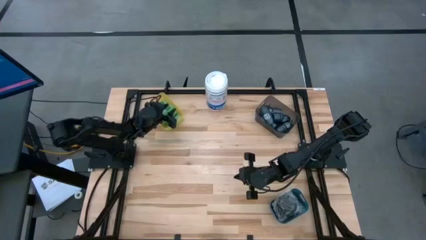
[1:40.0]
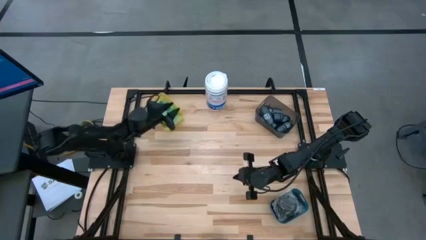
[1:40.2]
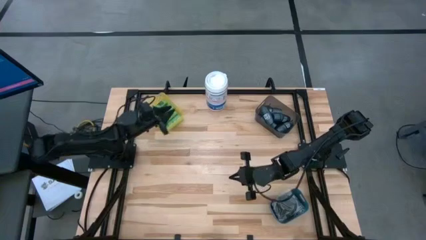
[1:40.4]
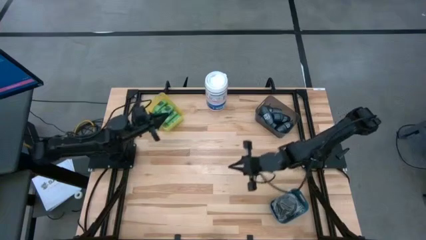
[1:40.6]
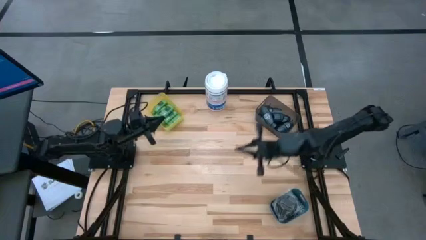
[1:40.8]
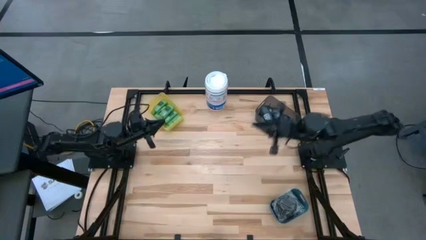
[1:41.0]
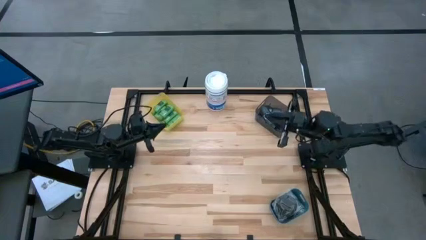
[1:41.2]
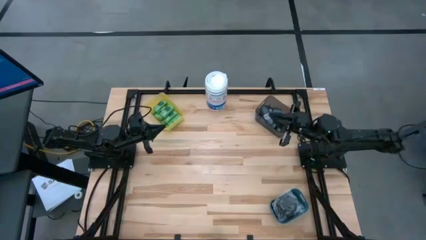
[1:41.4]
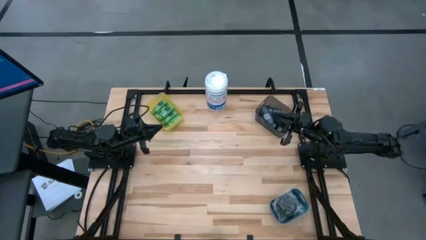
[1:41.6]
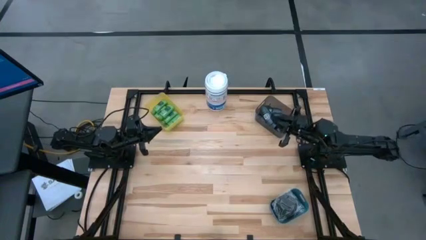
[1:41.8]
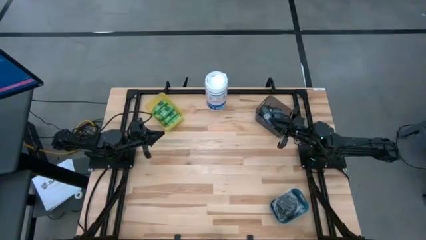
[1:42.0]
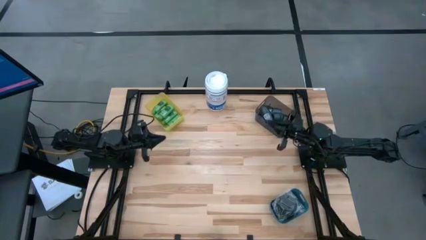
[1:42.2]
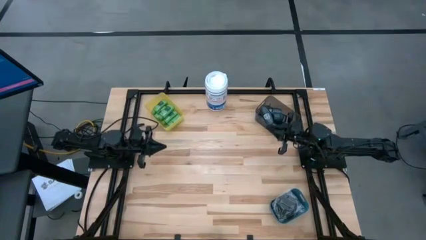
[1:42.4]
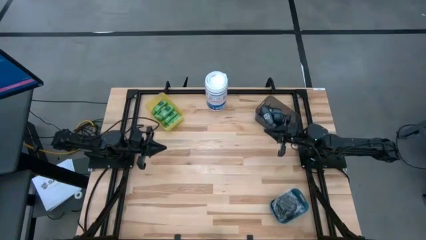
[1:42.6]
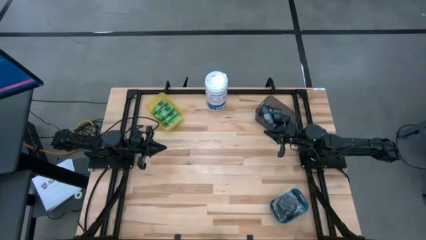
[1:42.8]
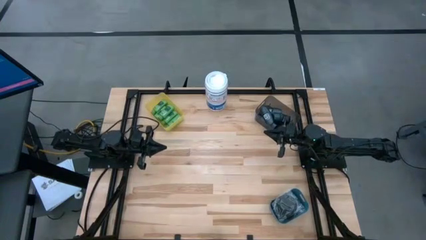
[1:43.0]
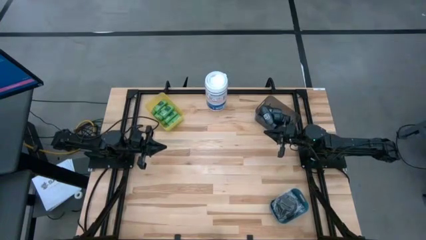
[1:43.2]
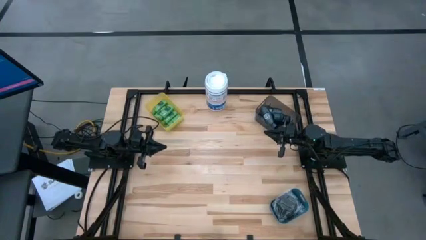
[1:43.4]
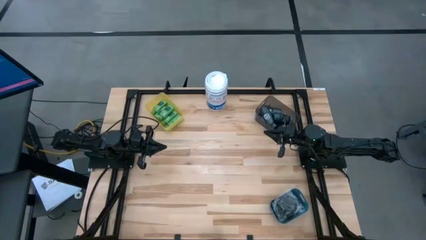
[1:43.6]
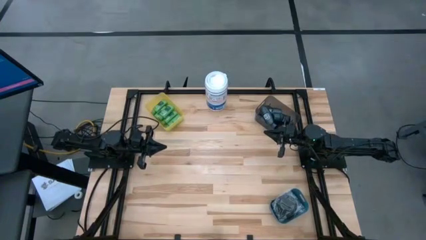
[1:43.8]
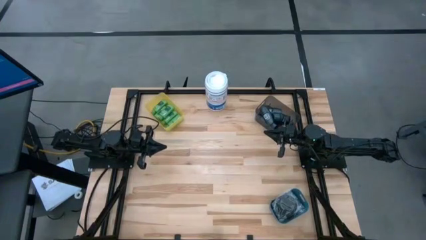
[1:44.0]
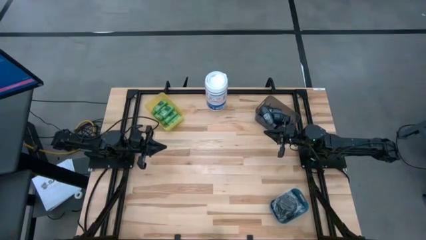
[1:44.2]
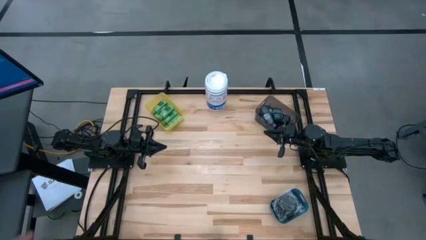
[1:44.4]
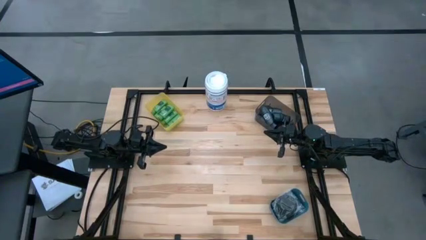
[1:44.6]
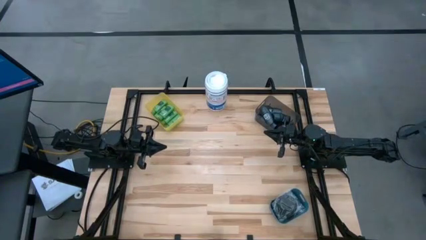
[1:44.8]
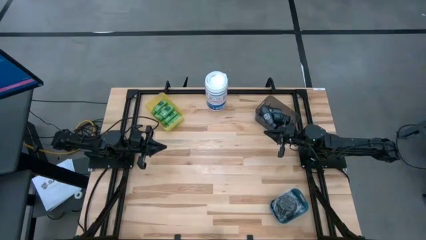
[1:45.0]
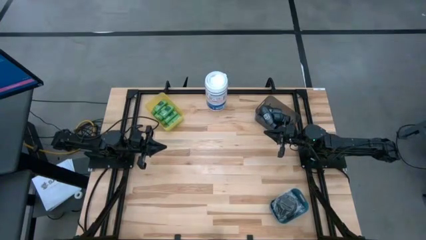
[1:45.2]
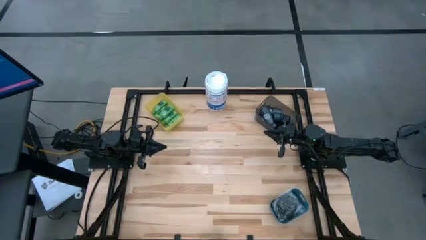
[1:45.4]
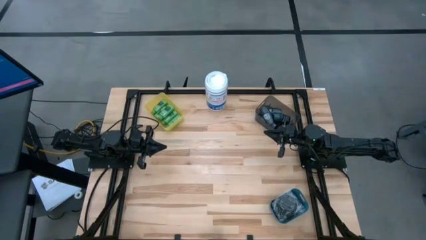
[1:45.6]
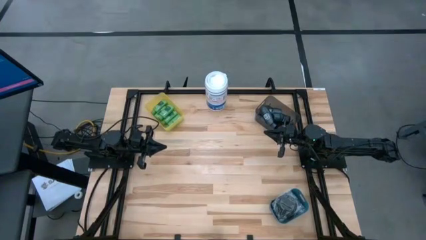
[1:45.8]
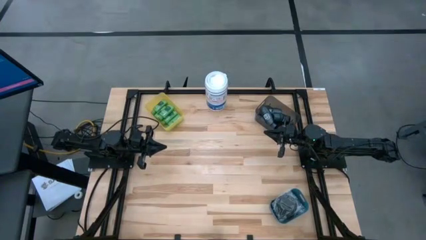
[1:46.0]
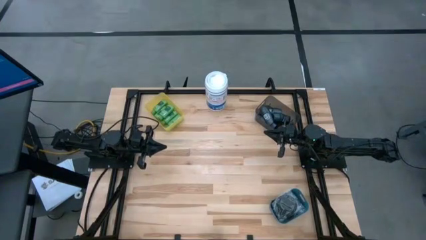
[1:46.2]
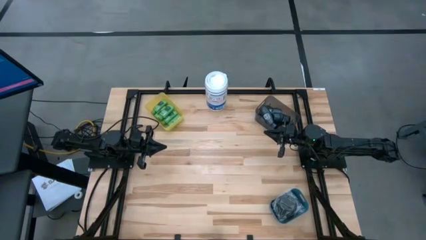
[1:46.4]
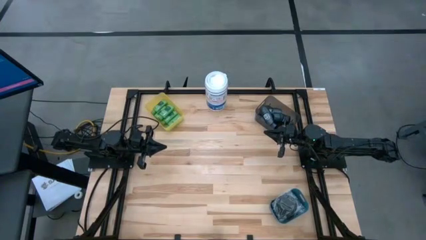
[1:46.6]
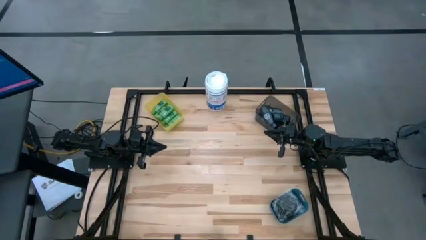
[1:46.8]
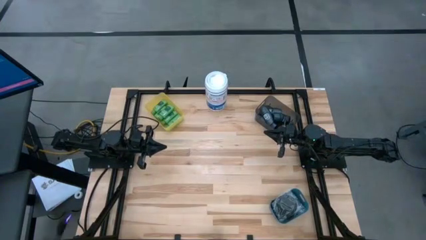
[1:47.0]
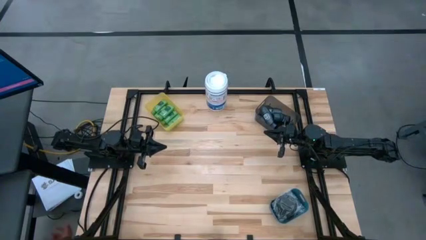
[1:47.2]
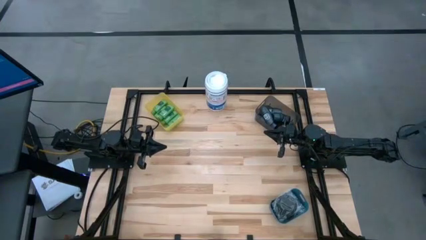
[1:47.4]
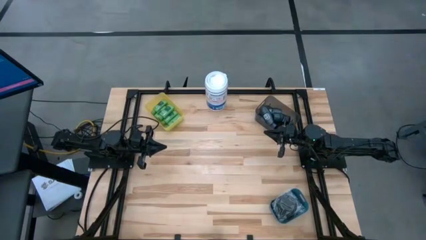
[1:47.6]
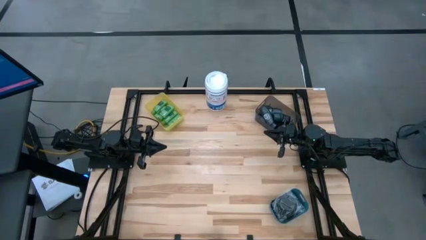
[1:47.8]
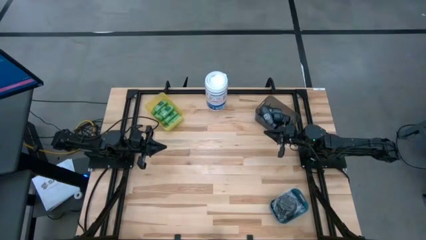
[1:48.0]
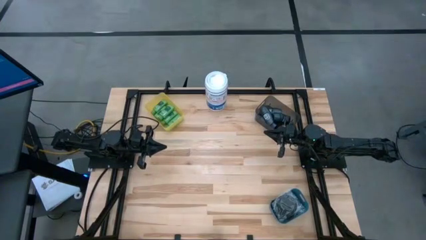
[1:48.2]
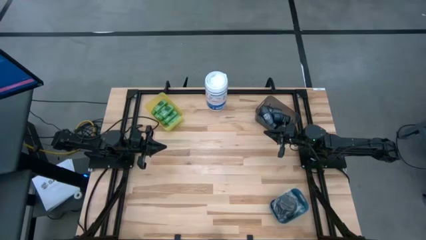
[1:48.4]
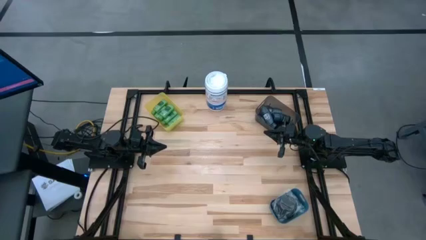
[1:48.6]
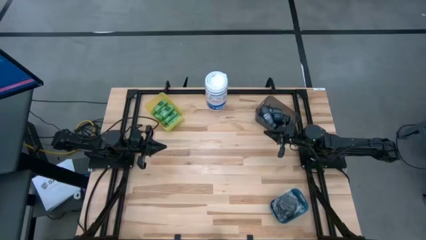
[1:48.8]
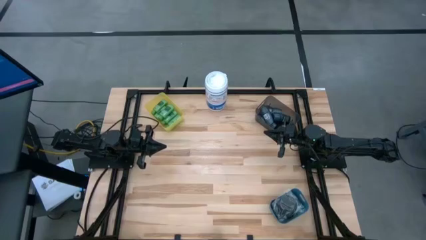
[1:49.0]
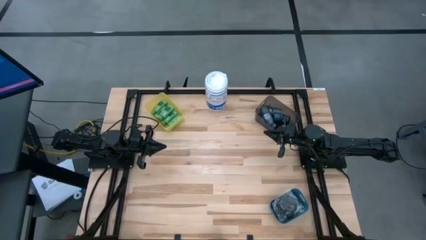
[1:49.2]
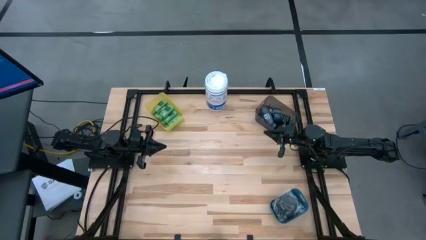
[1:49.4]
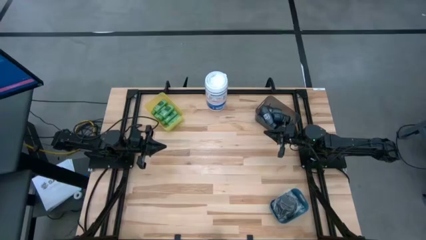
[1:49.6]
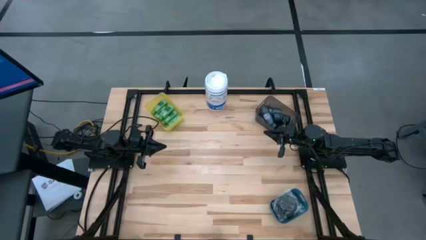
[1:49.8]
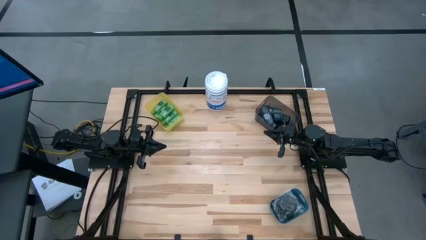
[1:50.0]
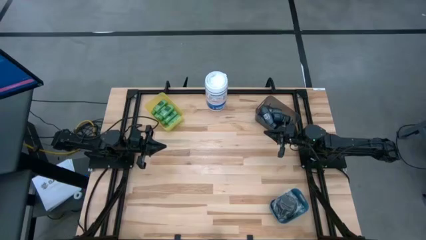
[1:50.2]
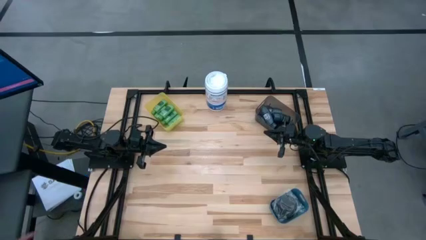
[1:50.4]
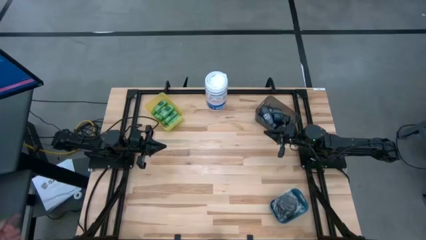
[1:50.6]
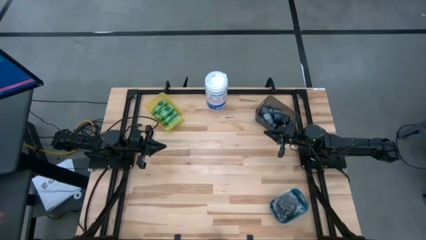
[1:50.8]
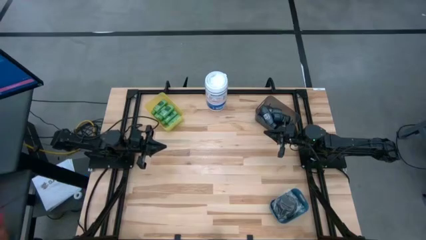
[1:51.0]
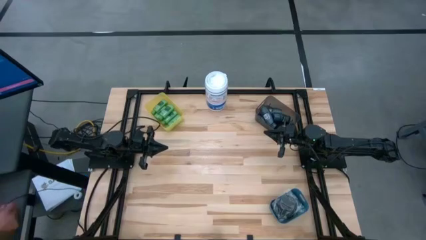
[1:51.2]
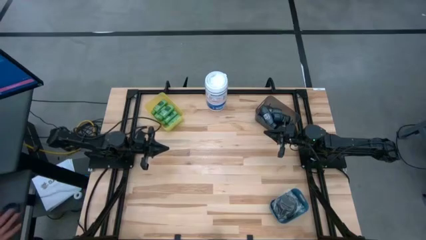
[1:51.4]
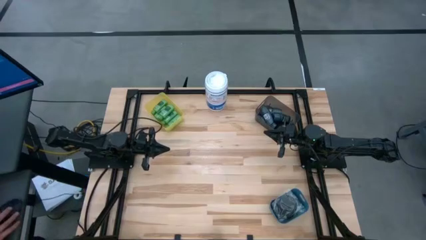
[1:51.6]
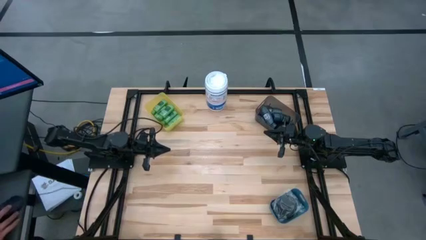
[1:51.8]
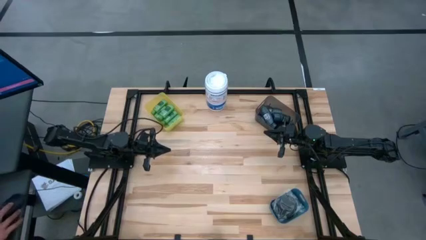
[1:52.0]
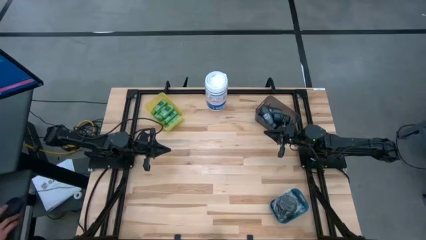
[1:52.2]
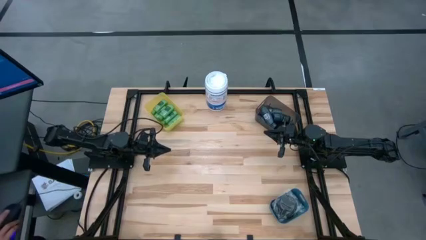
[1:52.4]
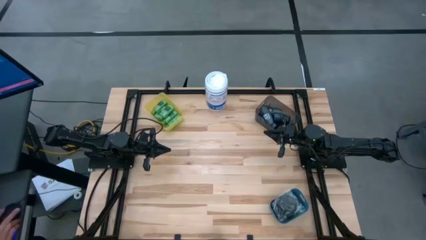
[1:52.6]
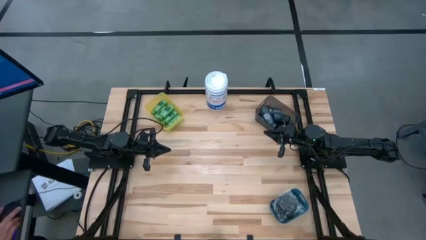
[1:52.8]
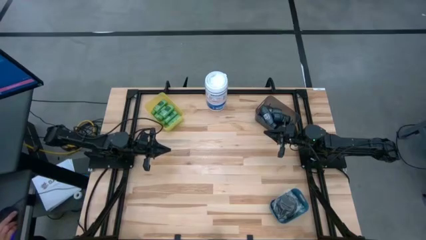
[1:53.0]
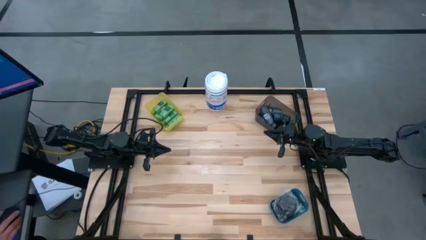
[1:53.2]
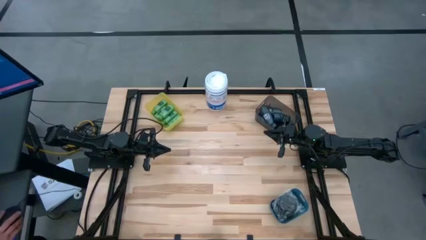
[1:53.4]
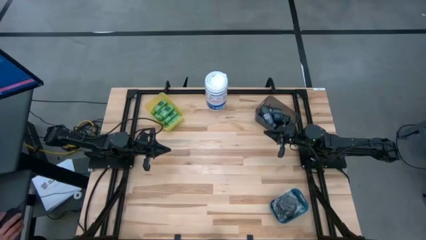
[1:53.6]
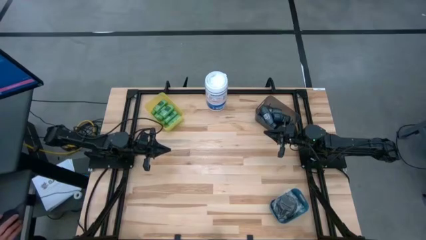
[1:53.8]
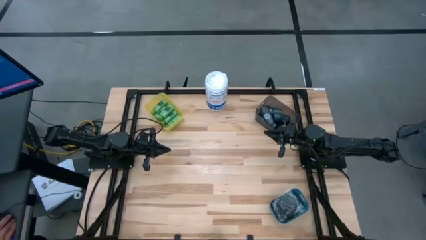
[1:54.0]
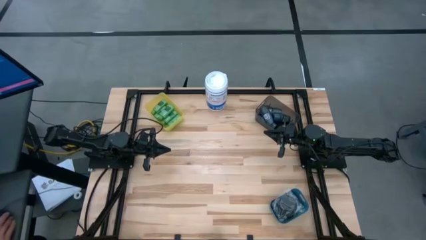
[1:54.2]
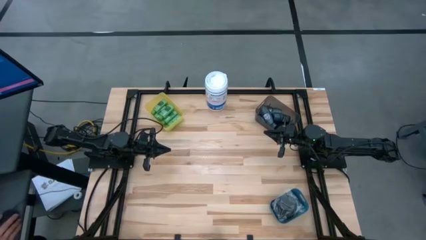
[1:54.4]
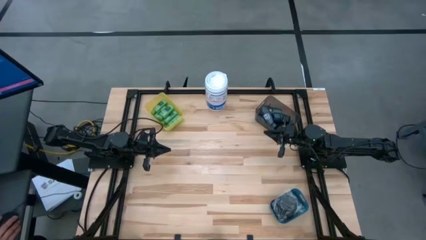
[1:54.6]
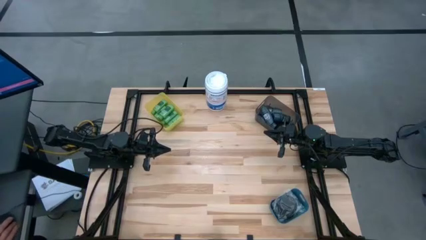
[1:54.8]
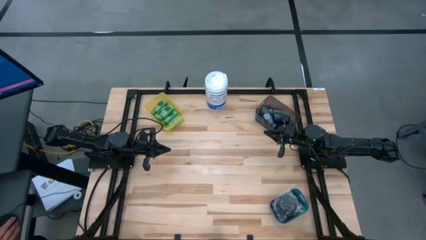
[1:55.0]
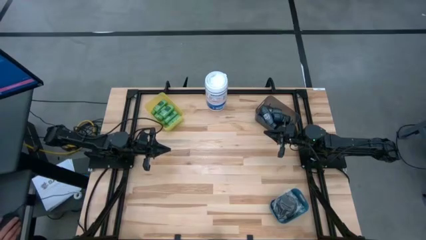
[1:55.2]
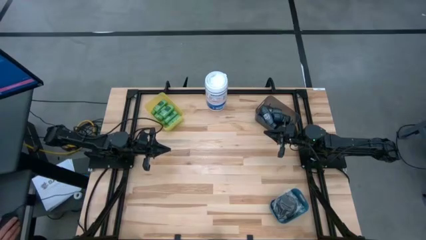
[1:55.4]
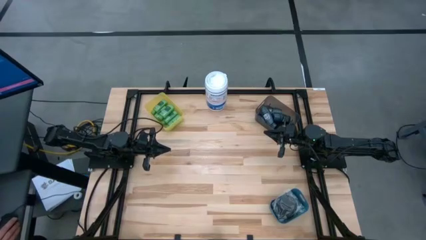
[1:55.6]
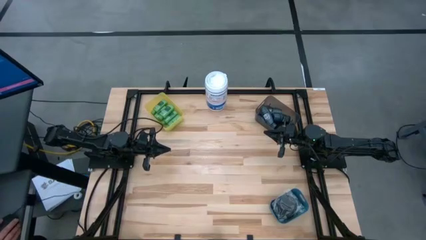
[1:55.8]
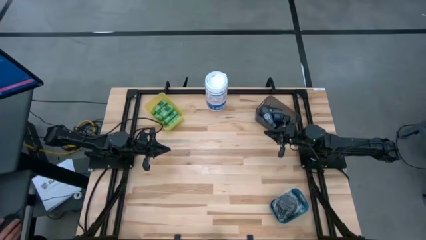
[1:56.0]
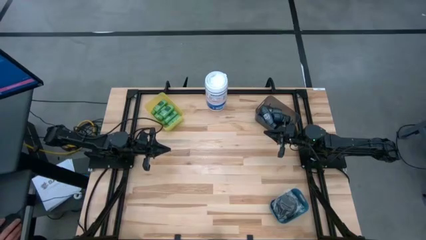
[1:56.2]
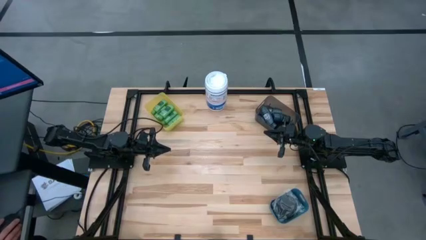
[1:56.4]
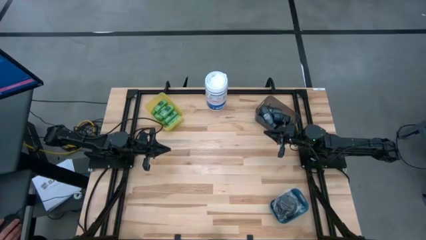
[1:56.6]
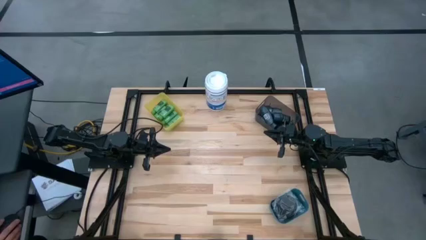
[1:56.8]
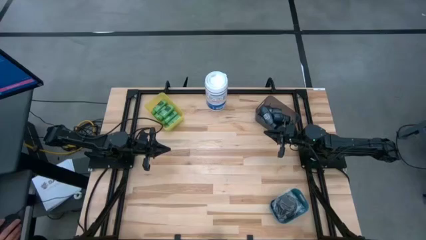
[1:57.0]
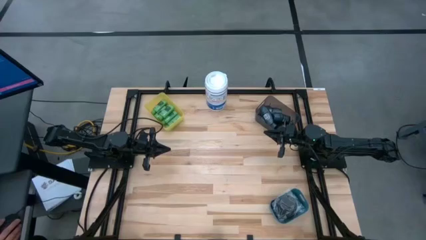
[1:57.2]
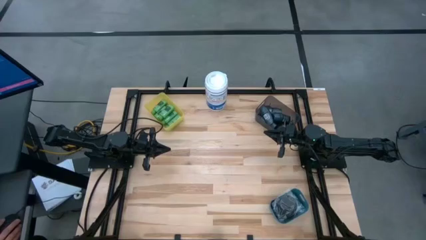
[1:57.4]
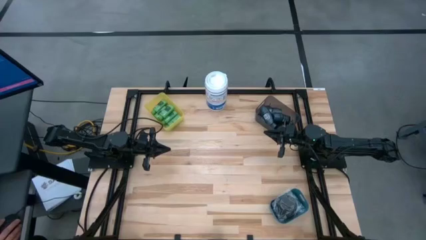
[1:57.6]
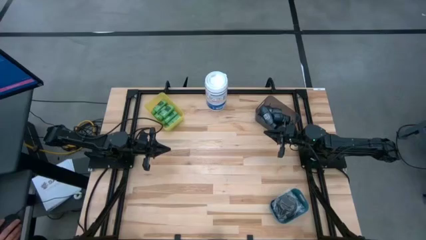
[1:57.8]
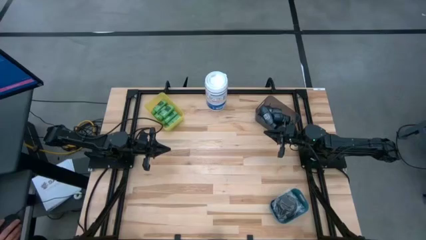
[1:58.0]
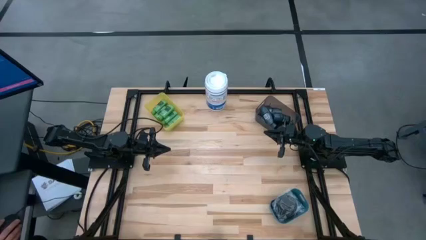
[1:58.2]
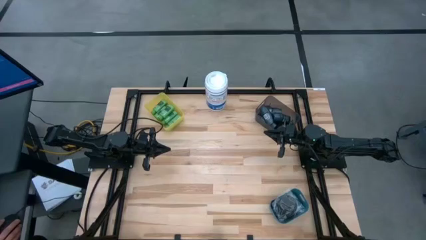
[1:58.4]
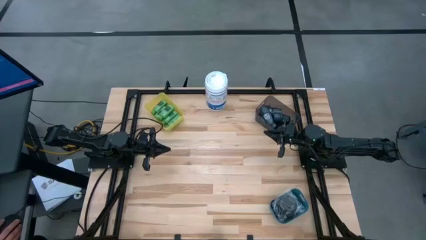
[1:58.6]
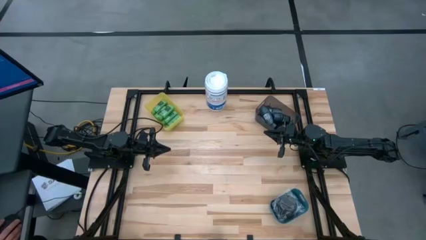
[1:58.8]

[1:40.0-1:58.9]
Task: Pick & Place Travel size toiletries
Return to Home Position
